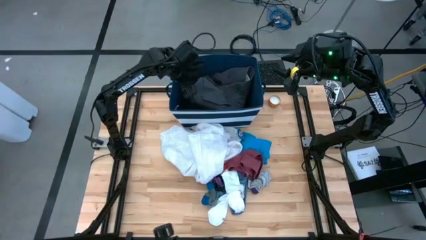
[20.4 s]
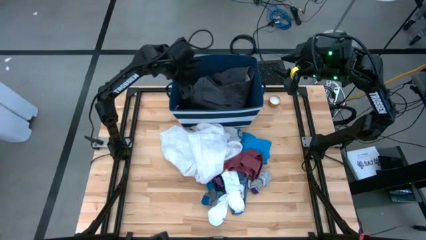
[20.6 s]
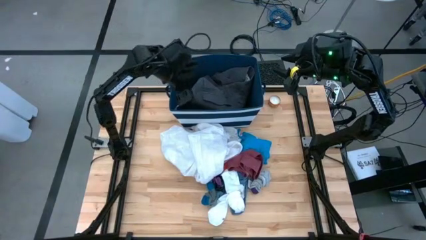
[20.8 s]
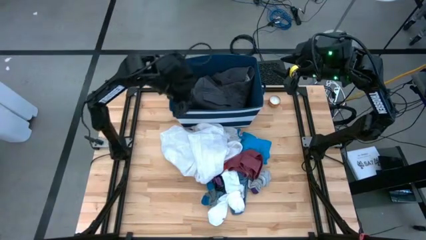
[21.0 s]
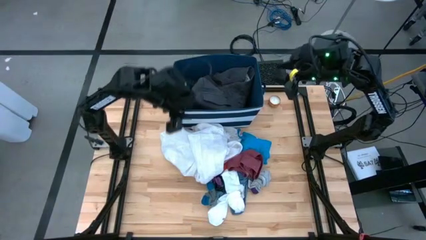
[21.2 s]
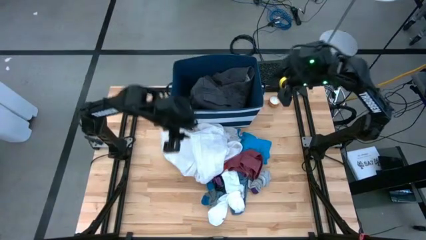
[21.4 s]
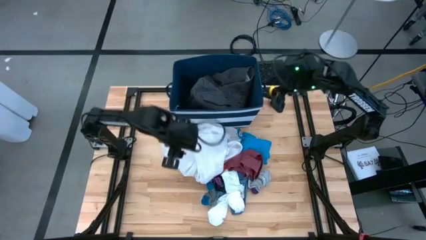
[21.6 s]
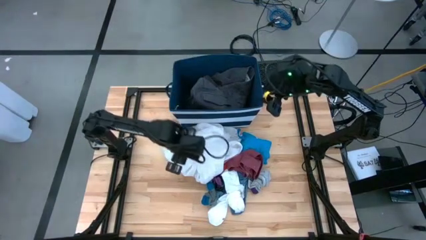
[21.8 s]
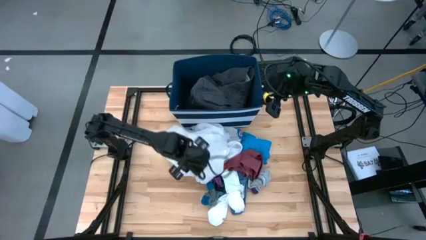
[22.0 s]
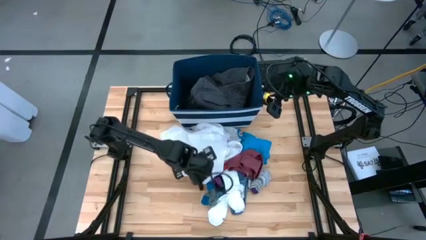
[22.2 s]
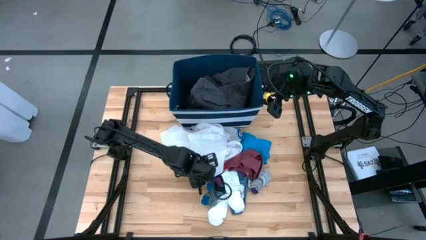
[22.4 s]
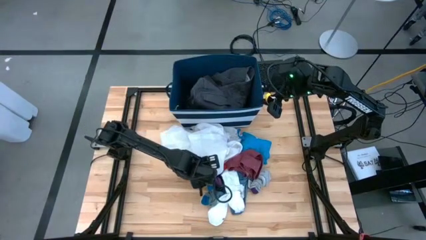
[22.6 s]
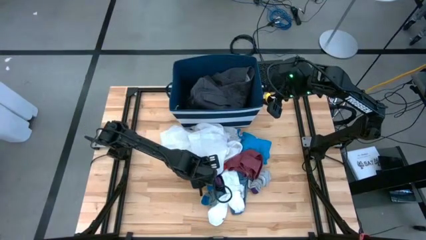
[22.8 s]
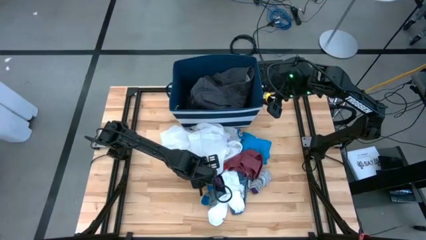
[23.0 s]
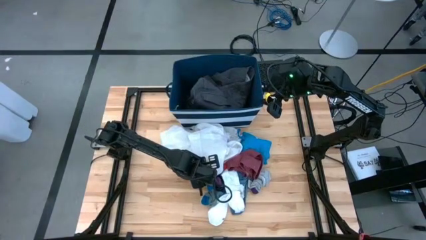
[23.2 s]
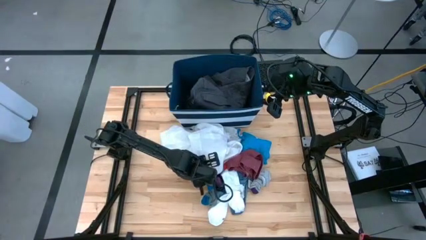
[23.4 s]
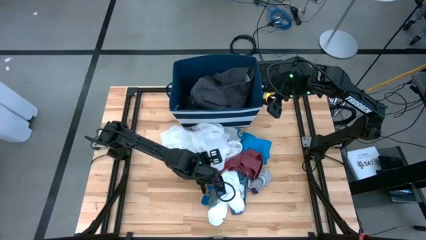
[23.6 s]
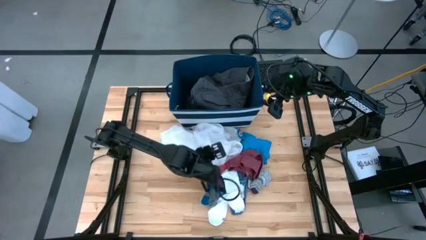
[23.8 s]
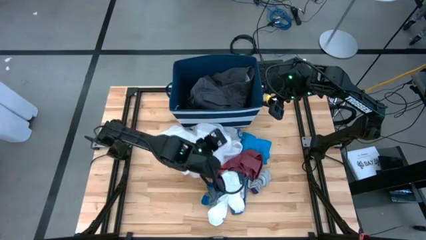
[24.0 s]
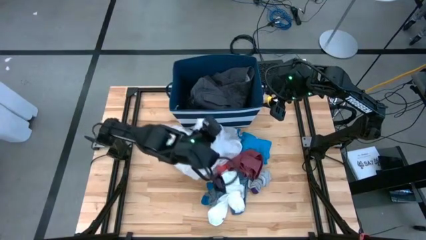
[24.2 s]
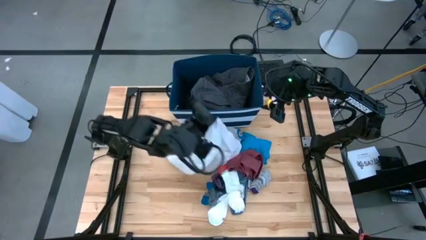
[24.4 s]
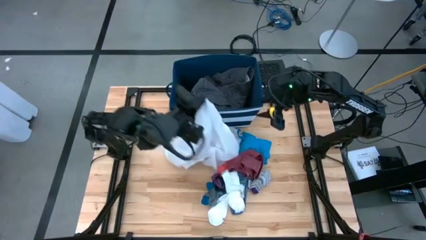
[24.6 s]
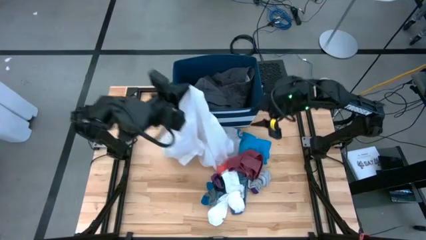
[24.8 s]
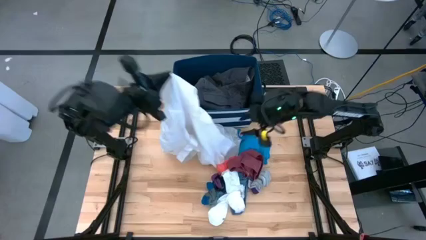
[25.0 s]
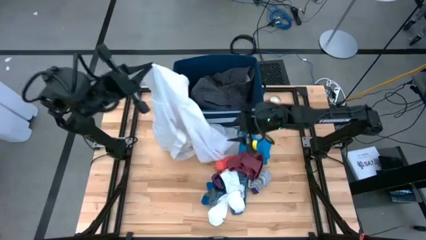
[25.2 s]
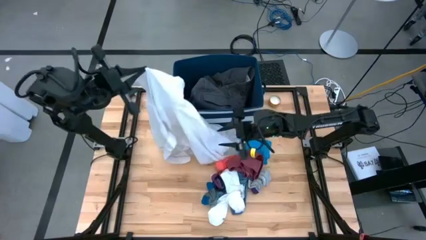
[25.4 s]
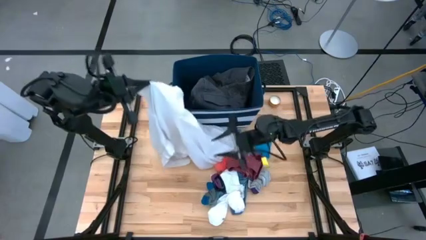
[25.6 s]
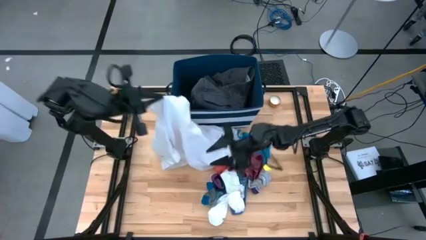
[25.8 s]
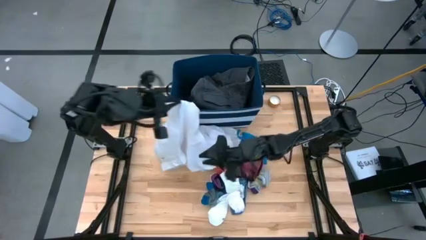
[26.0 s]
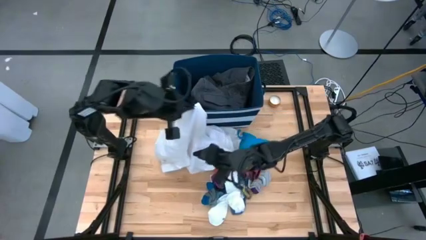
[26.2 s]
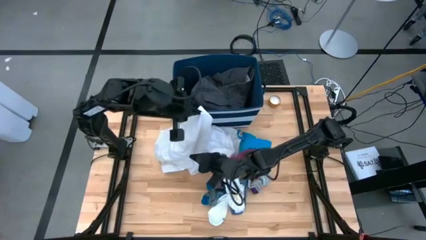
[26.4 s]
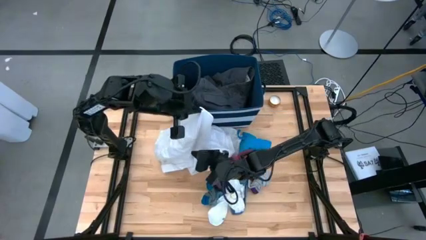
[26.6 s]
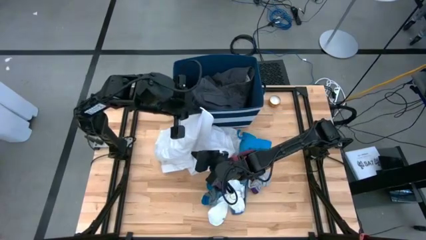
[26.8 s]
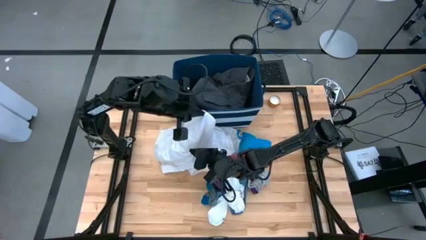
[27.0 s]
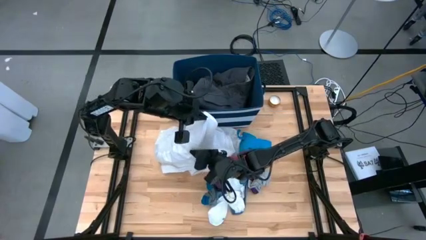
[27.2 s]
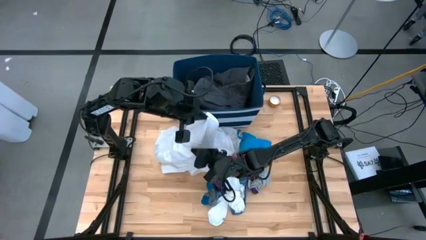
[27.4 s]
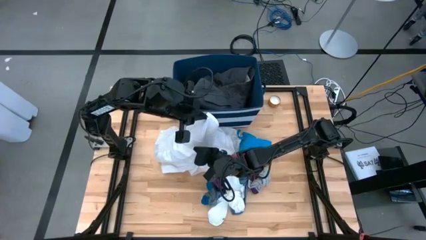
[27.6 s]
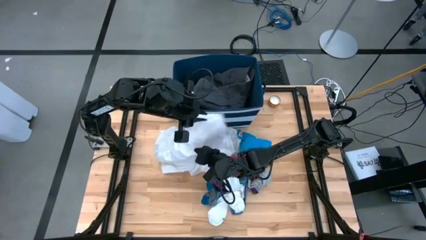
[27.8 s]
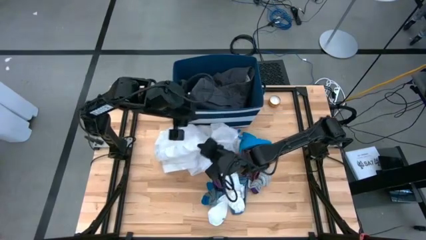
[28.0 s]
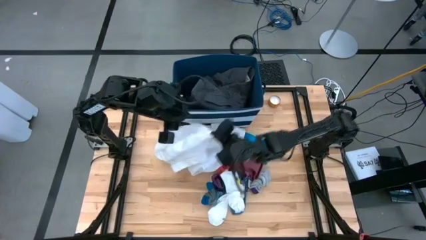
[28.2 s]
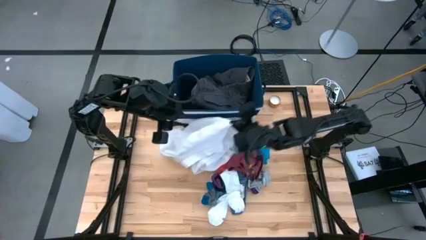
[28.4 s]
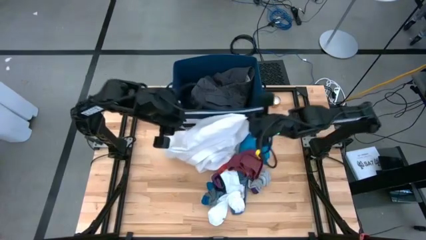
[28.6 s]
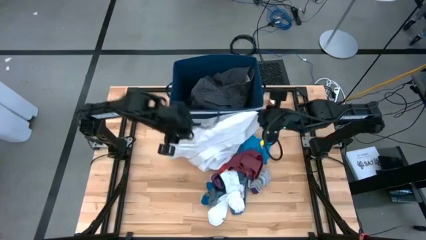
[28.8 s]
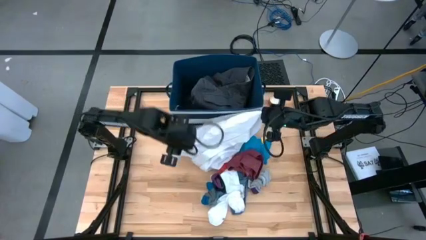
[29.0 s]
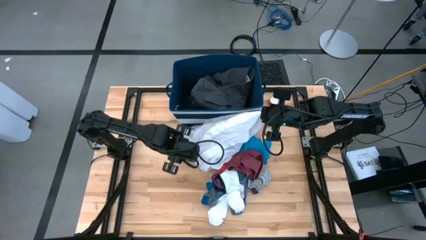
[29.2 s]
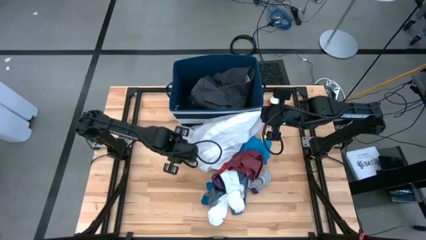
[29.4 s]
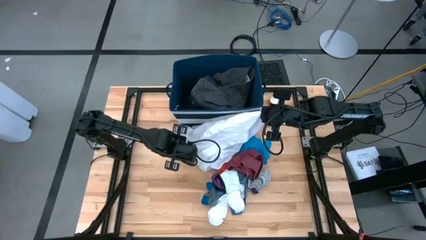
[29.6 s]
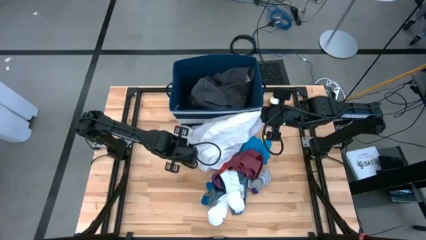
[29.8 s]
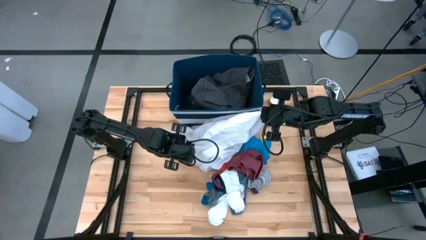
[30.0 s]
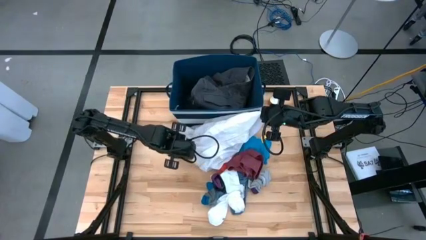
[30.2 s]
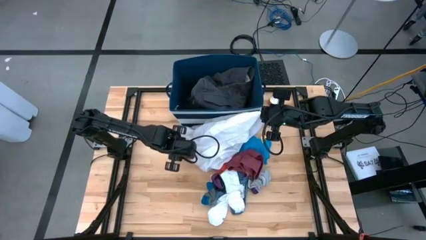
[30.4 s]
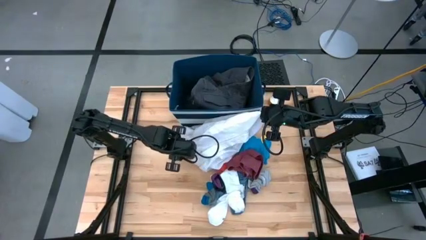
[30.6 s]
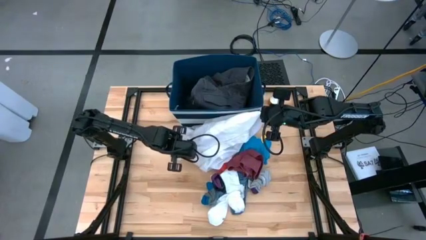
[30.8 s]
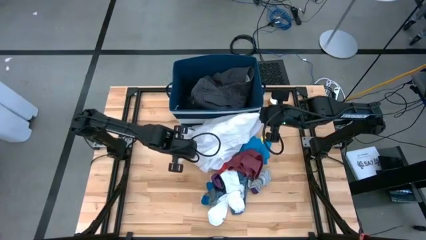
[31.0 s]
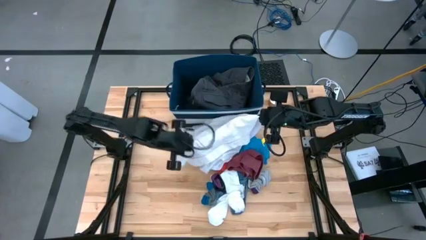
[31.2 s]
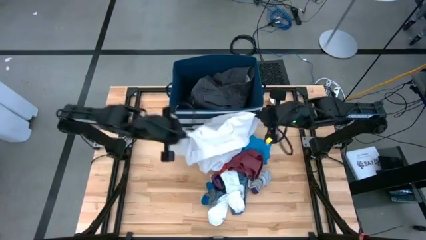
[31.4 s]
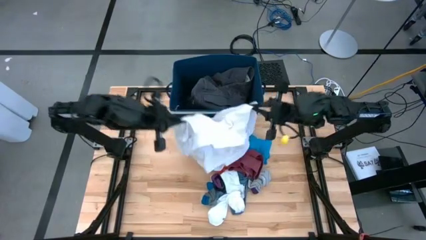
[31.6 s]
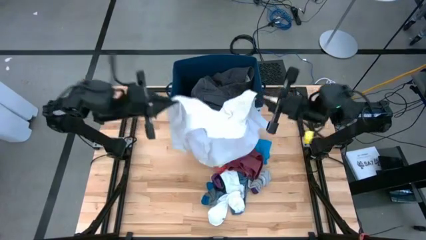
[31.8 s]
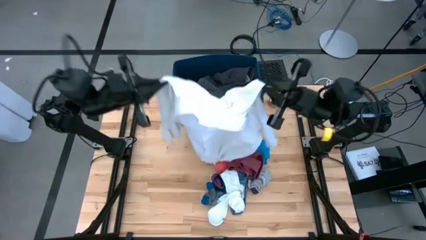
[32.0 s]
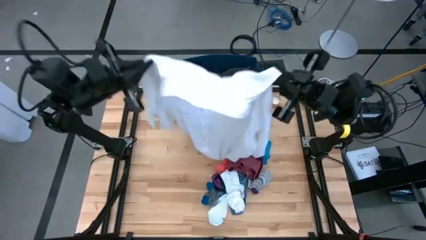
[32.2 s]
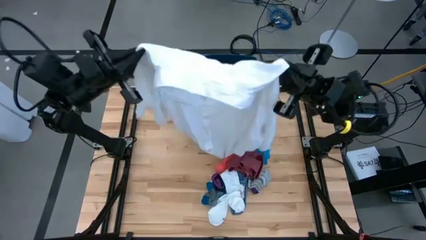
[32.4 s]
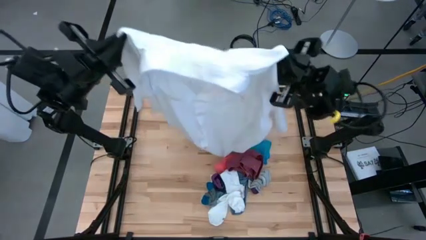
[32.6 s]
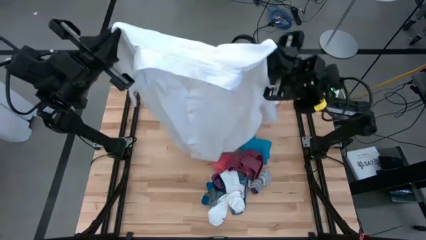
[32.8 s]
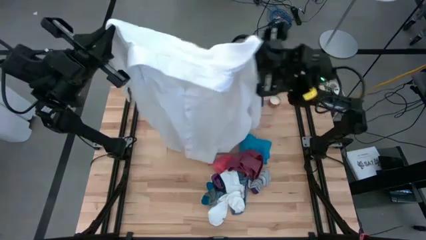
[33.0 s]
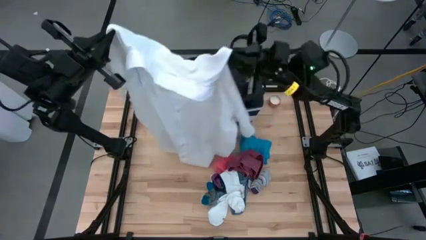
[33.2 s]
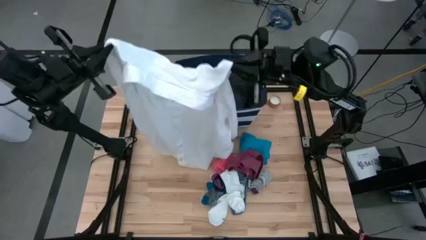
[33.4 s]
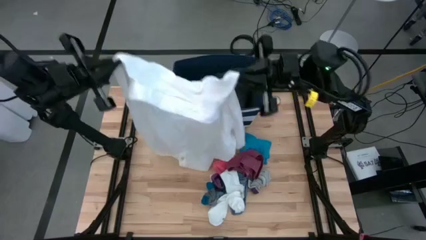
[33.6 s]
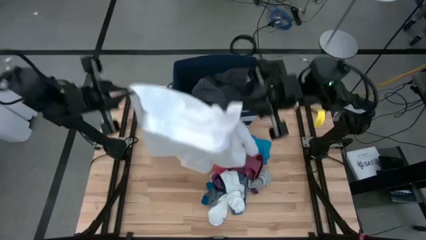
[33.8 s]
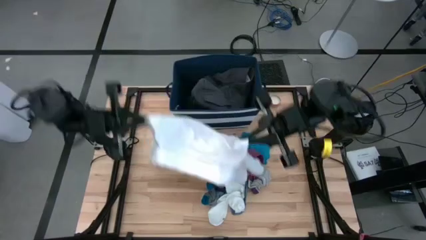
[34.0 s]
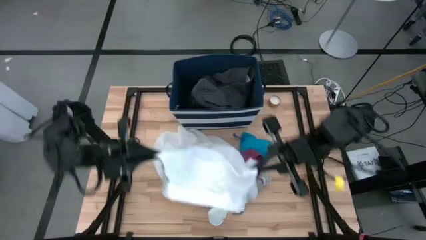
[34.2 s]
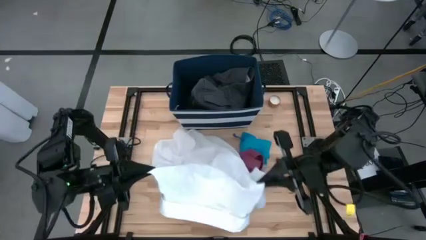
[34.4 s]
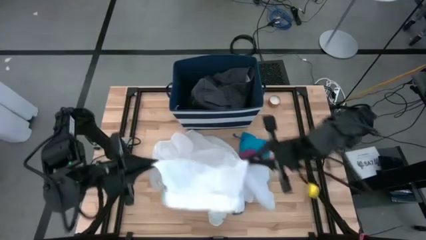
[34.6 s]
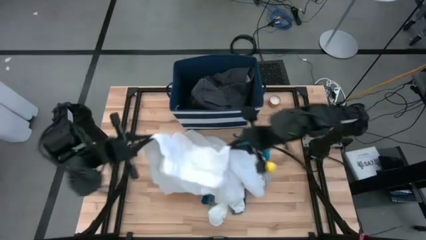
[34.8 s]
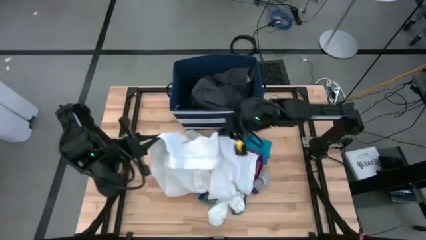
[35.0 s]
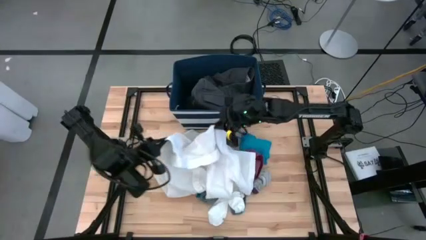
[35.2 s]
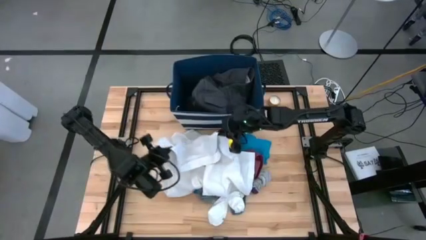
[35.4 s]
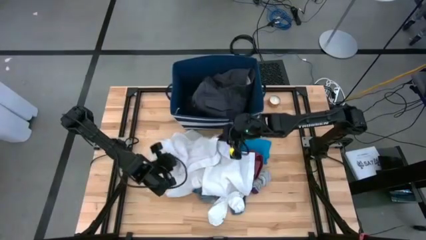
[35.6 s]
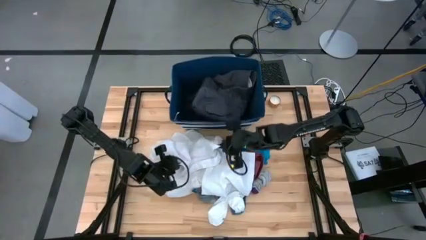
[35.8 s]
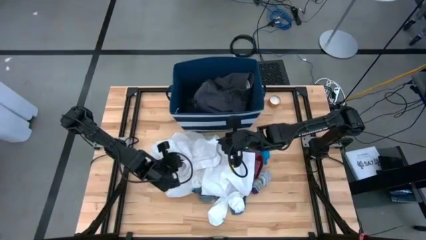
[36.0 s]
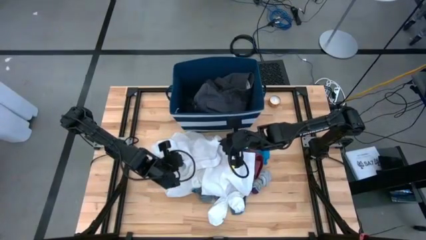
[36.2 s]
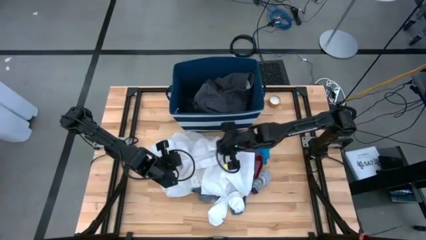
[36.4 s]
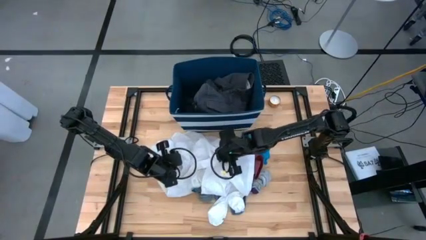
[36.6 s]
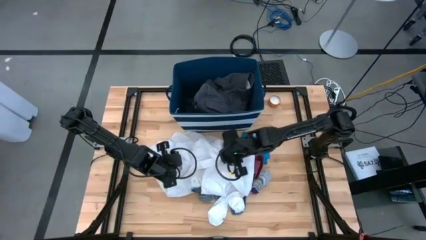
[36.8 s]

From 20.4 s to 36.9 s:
Task: Sort clothes
Put the white polo shirt into the blue laundry organizer
